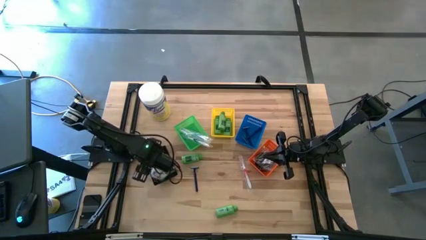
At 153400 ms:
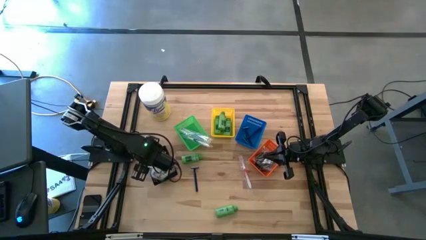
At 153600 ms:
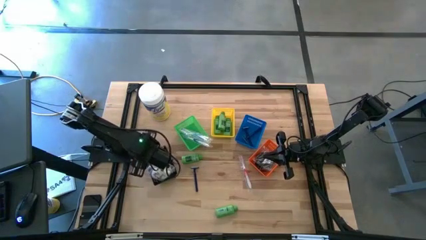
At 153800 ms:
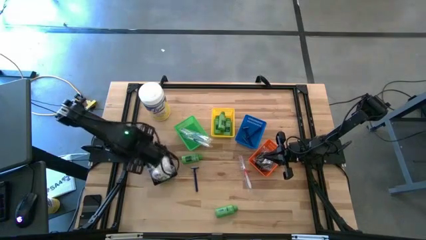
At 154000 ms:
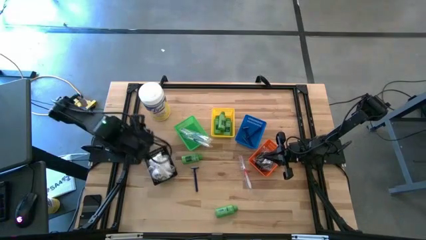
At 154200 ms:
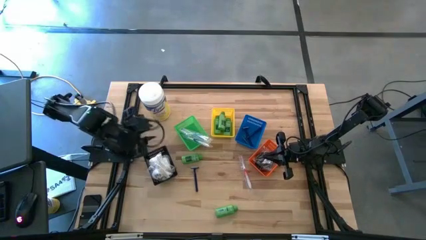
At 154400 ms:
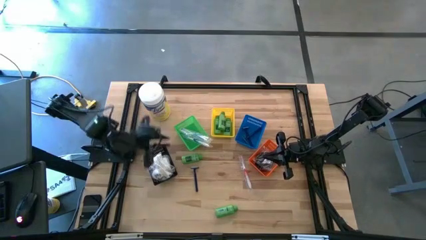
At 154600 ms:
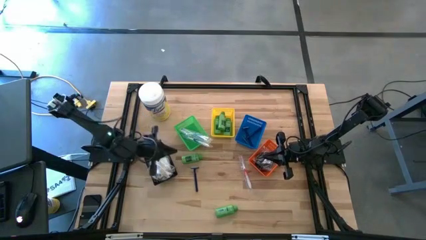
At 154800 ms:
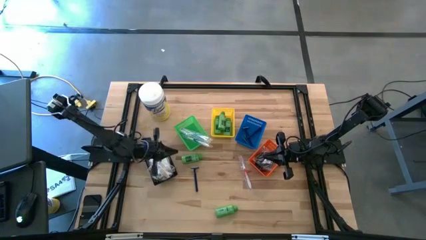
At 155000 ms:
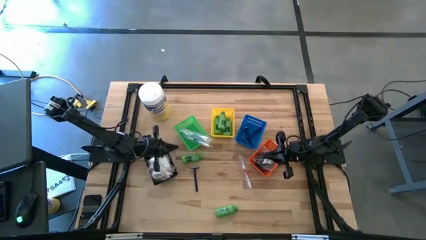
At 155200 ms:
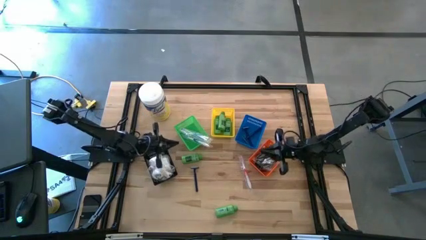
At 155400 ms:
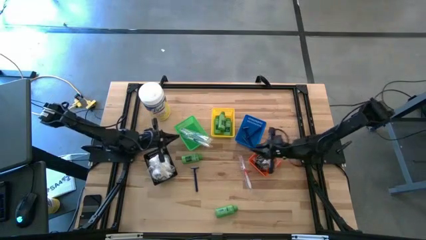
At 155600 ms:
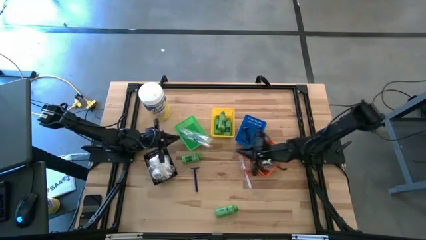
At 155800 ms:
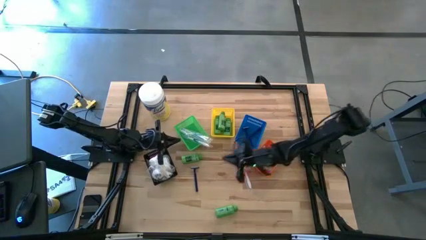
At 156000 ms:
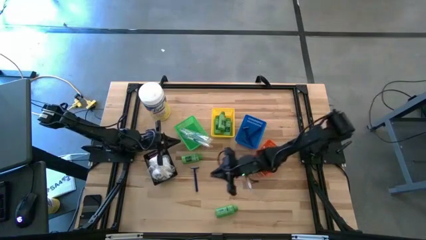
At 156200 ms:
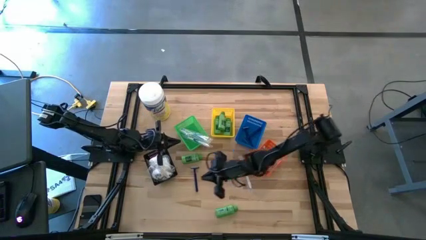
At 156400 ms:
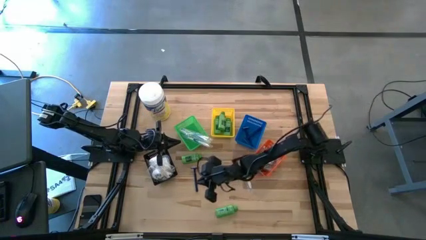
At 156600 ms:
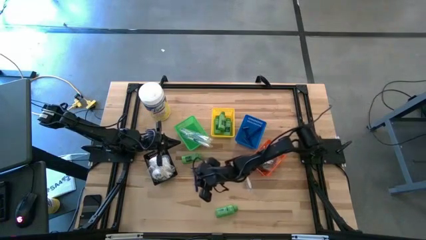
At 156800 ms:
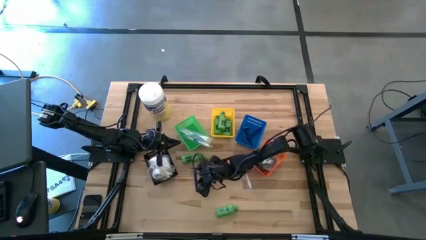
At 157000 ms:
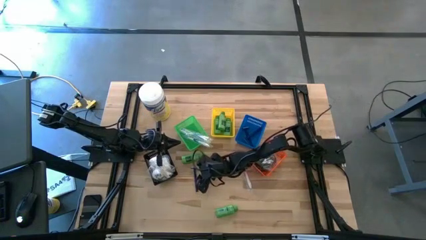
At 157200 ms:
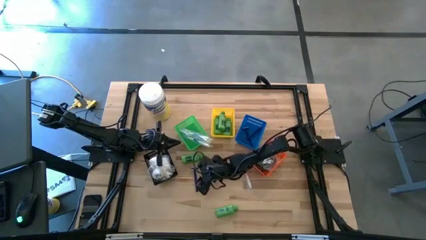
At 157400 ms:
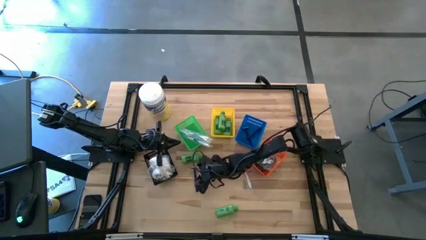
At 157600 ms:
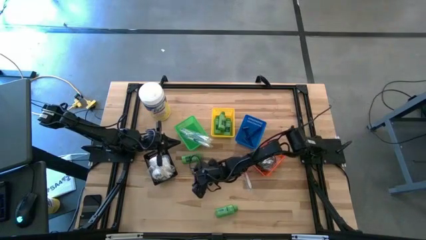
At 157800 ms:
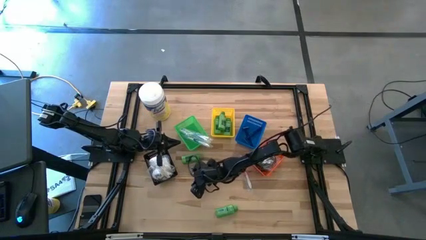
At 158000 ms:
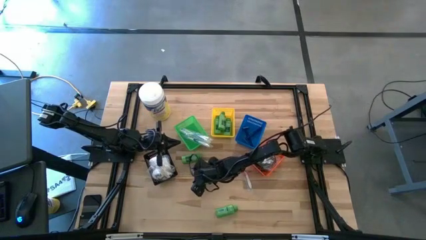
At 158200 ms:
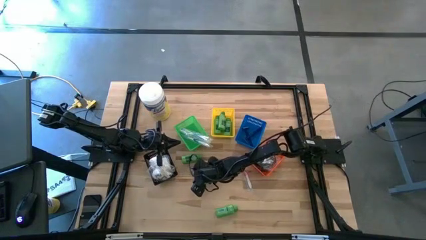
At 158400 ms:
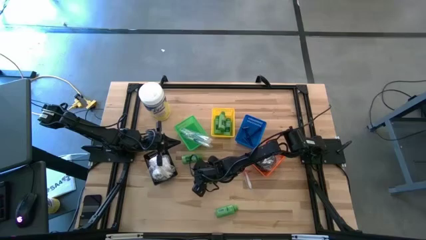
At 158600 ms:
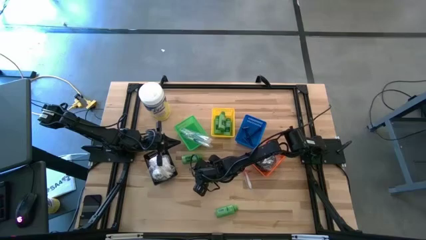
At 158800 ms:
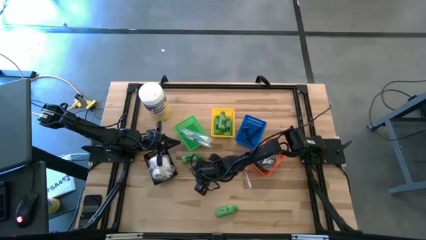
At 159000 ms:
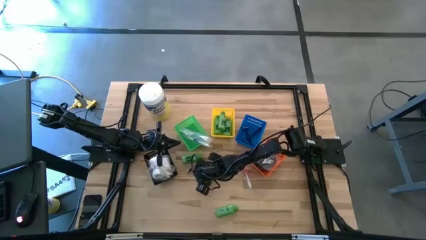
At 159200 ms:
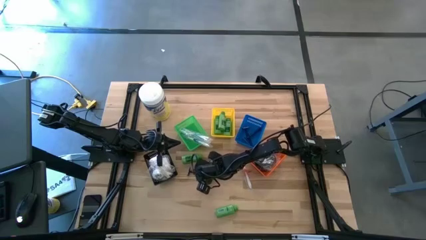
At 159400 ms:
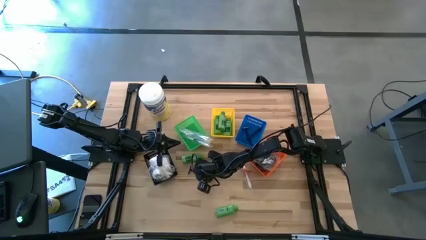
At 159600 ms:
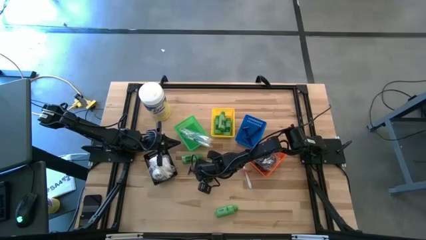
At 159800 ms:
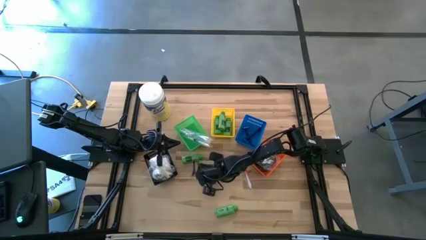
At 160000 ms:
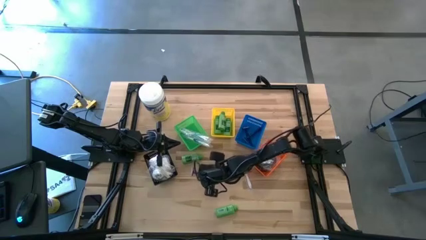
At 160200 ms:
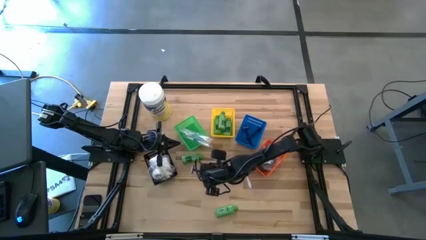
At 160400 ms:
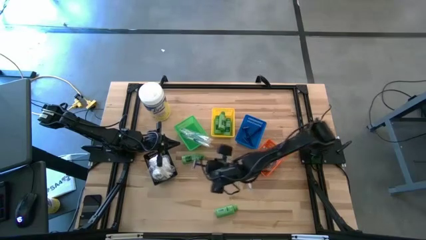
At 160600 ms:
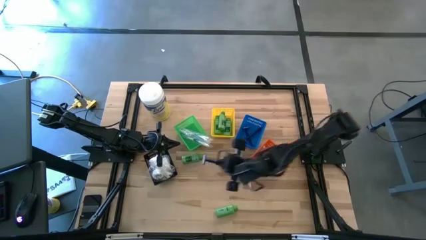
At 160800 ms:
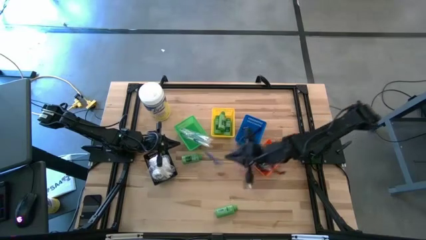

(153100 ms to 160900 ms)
Task: Pick & Place Travel size toiletries
Put the razor into the blue bin

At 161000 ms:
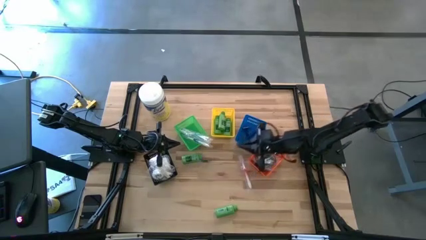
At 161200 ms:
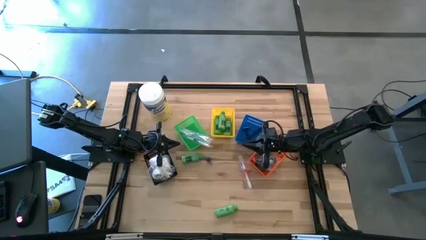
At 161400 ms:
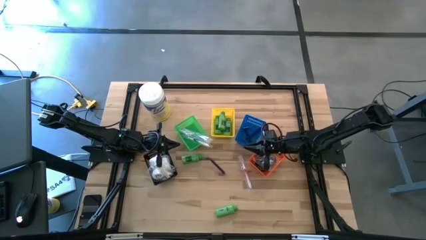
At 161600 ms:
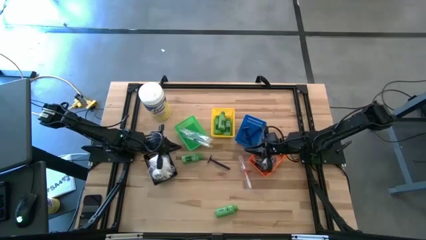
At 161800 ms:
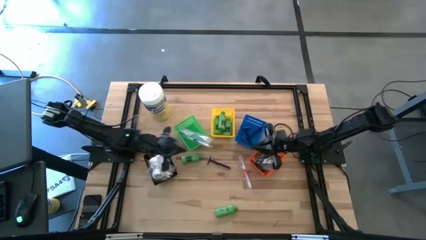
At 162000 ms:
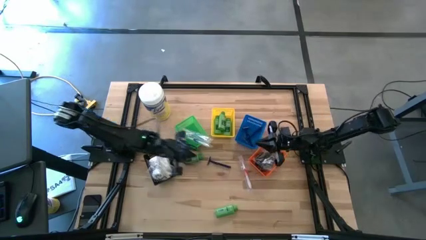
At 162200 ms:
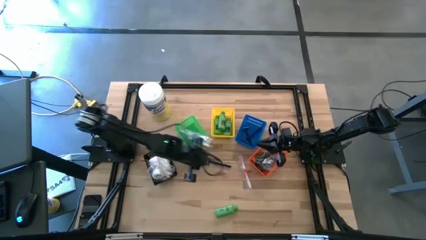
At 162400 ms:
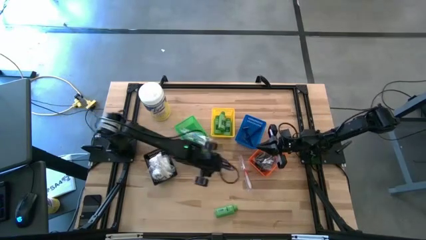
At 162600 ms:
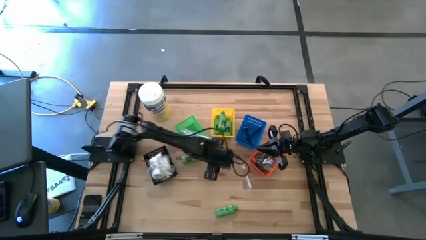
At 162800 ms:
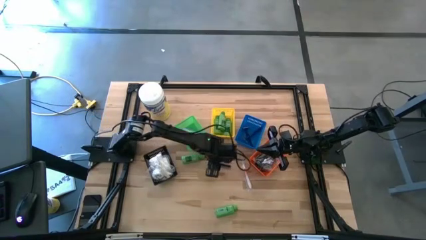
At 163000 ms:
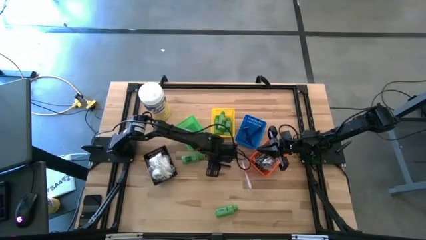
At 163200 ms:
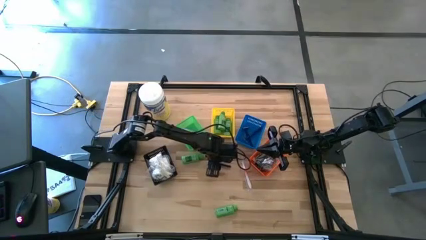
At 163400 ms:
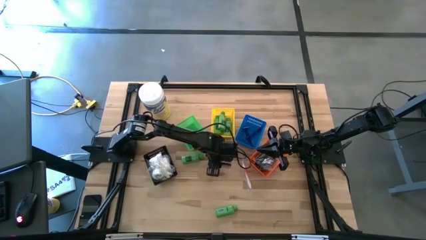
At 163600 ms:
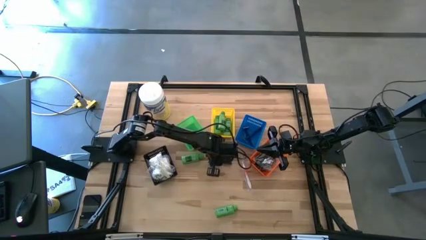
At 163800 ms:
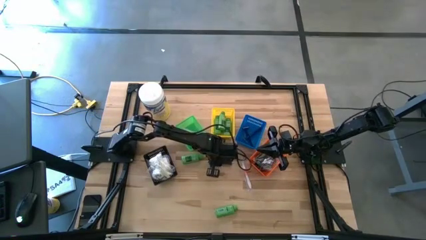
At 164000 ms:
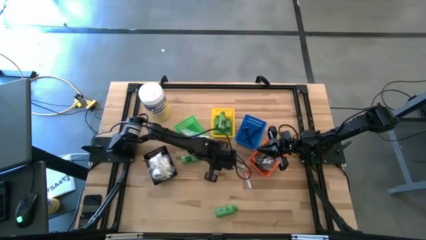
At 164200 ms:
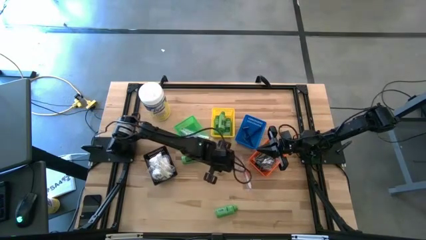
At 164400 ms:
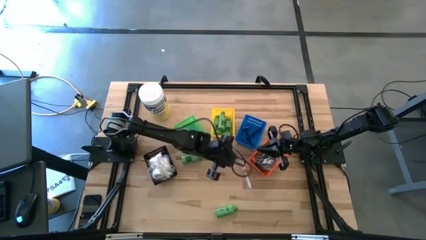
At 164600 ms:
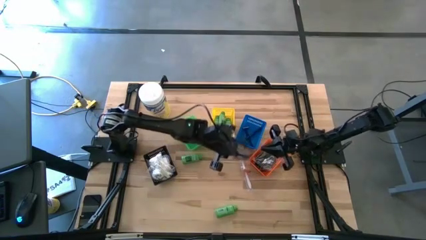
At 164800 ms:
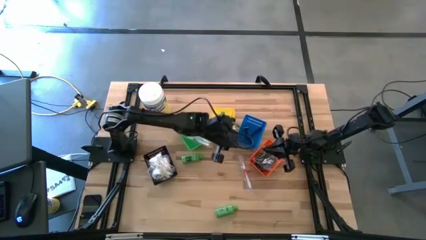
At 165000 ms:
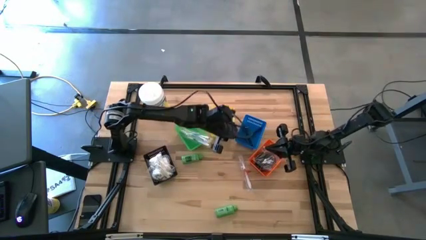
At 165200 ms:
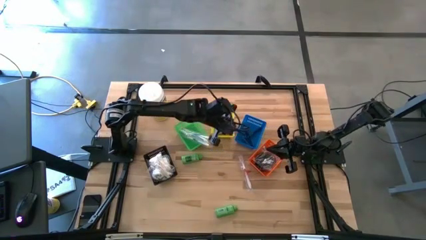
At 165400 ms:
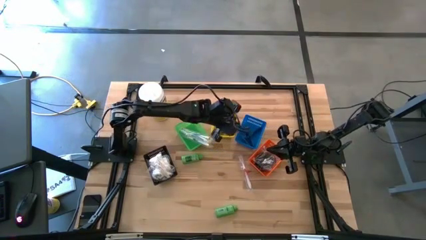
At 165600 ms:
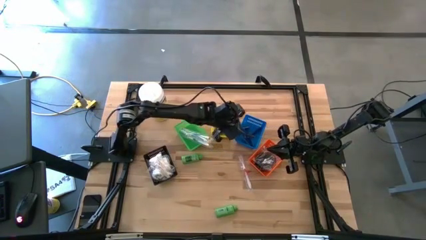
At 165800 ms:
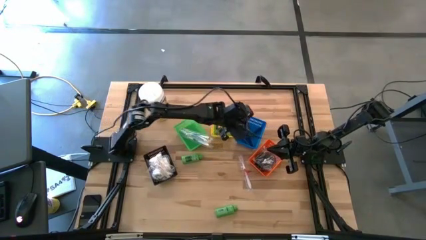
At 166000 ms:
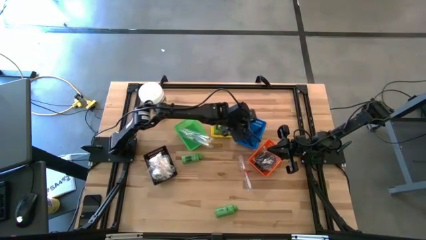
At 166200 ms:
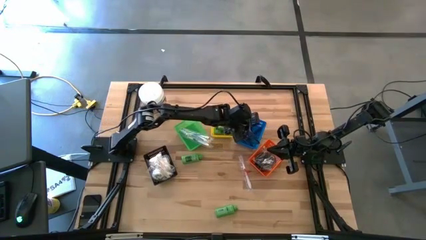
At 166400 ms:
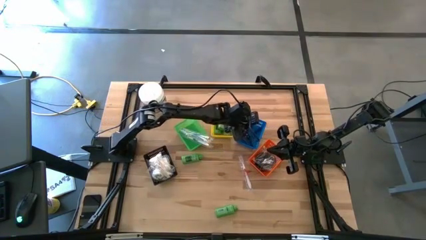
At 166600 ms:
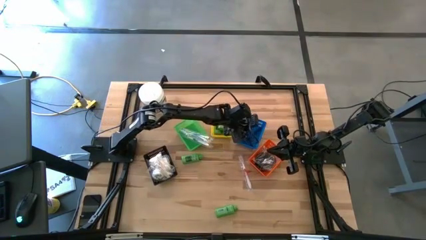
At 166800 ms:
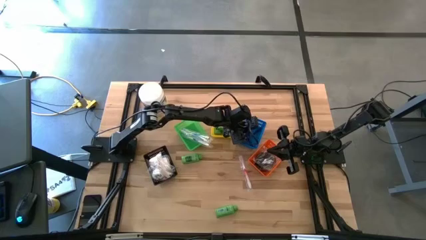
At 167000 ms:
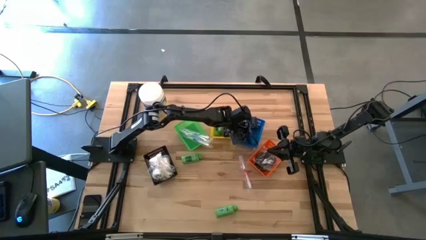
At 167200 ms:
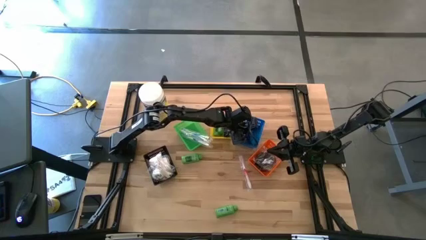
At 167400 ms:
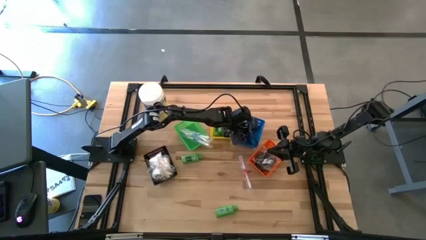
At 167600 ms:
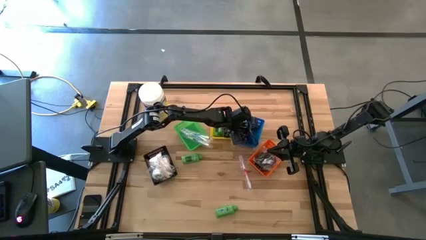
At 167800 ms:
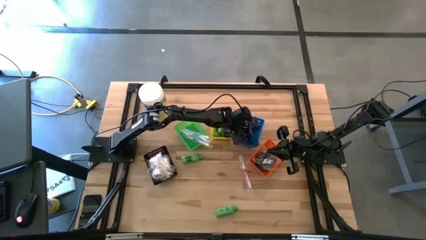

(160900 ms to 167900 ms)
Put the razor into the blue bin
